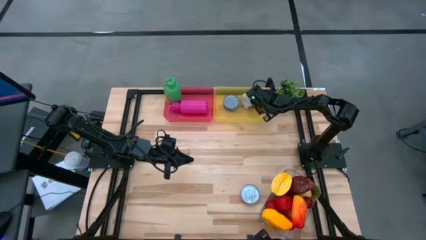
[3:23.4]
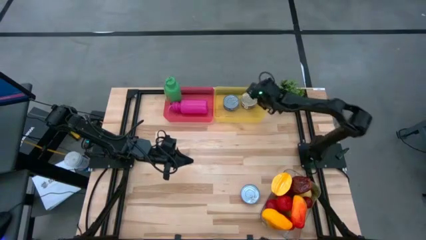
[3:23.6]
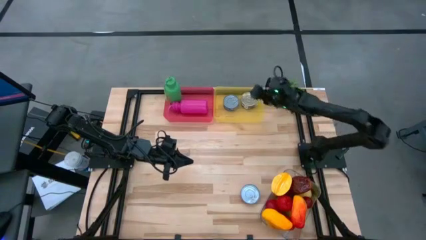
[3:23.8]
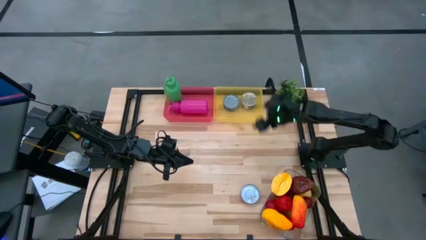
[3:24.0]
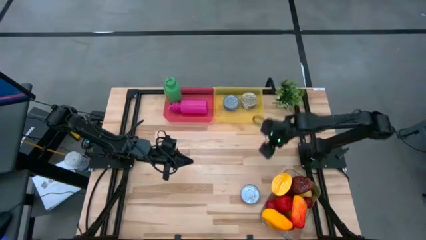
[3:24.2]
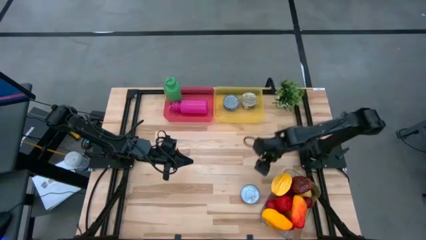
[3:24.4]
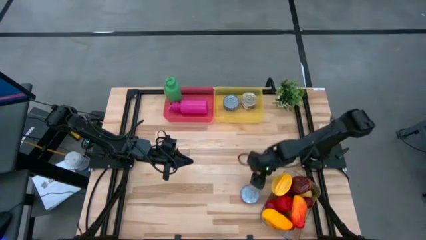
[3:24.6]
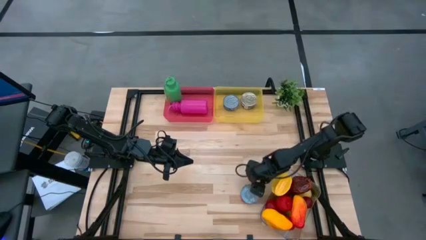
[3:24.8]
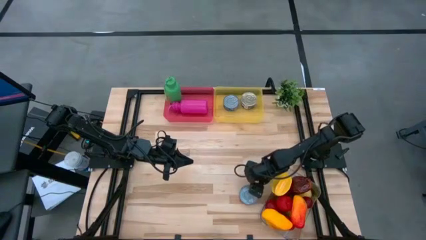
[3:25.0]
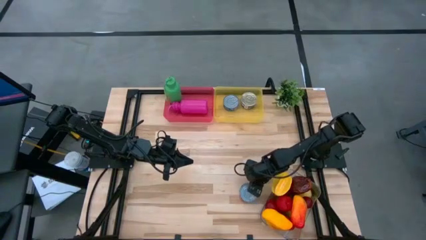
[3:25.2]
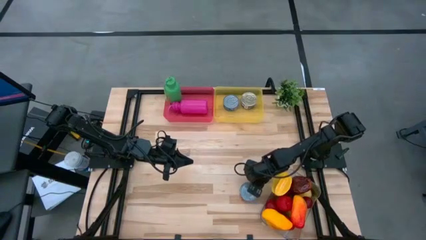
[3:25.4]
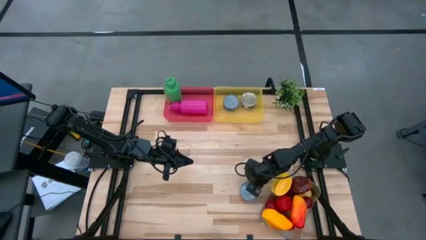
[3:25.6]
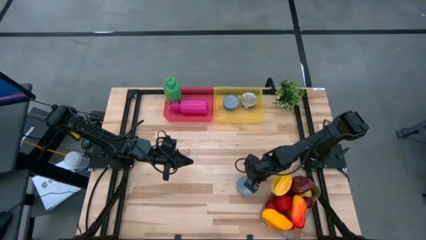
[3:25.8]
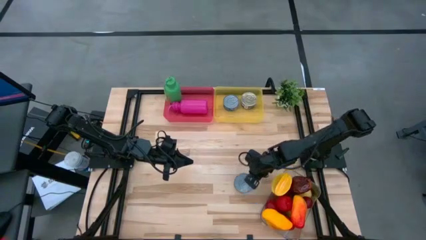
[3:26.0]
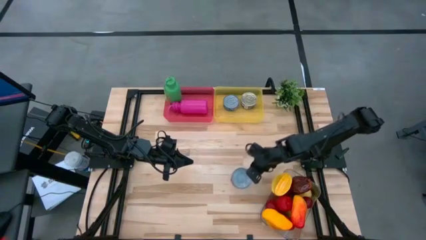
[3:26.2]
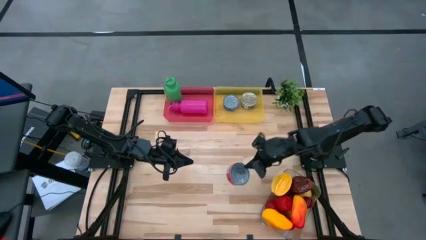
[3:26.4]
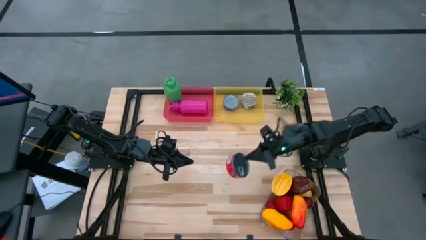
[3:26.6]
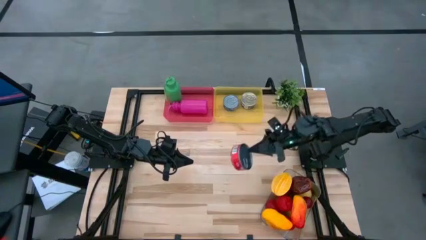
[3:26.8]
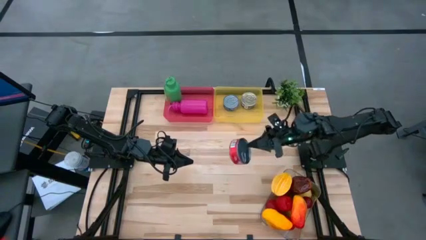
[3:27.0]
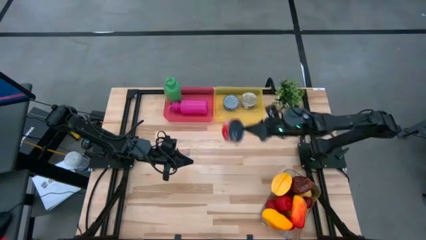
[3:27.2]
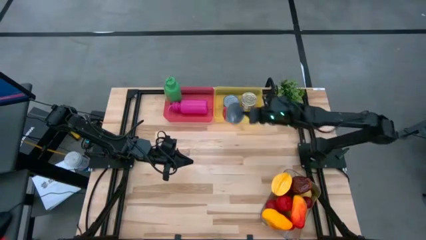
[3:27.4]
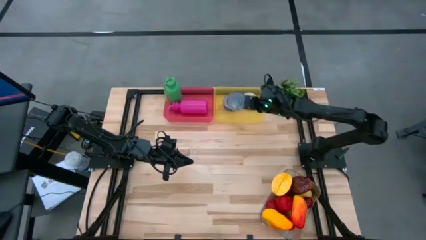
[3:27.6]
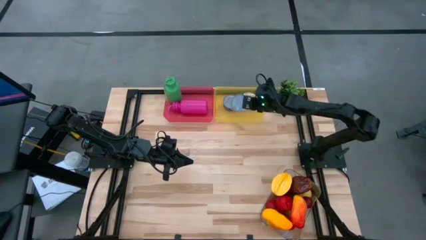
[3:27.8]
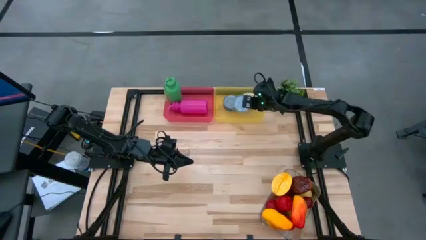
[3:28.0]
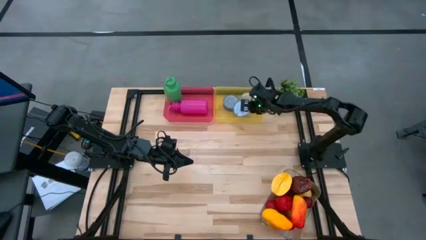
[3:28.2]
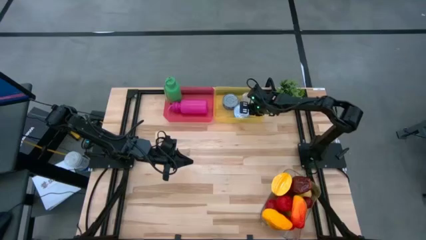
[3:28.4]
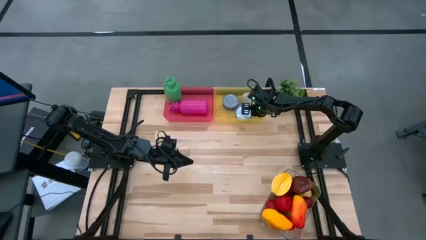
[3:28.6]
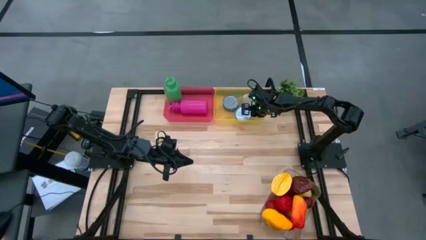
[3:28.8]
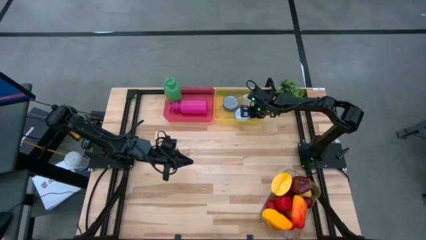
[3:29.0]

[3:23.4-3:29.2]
Task: Pick & Place Food Item
Put the red tuna can into the yellow bin

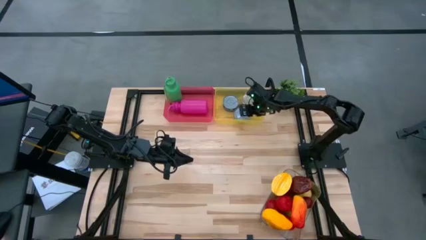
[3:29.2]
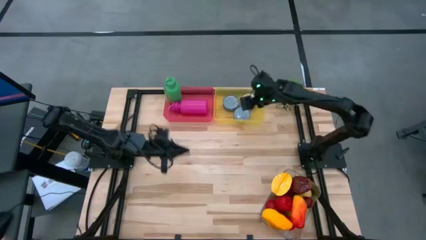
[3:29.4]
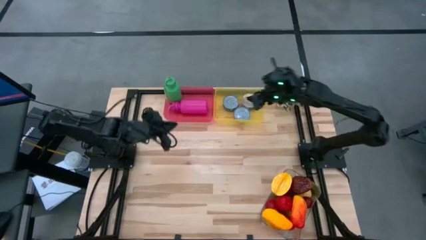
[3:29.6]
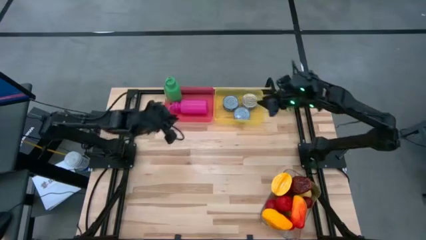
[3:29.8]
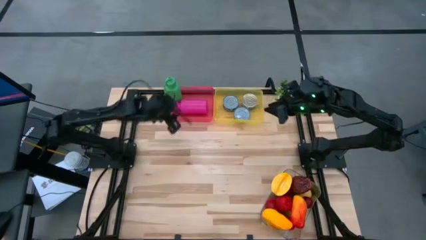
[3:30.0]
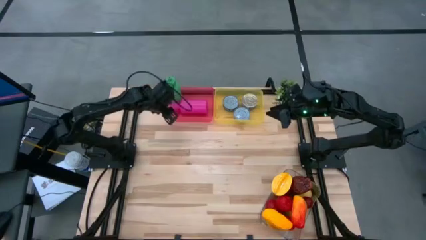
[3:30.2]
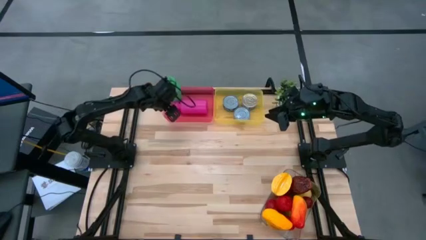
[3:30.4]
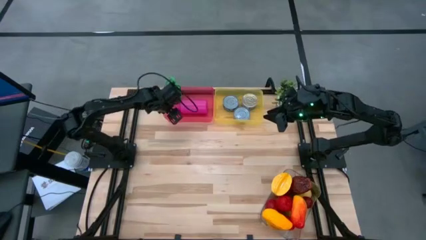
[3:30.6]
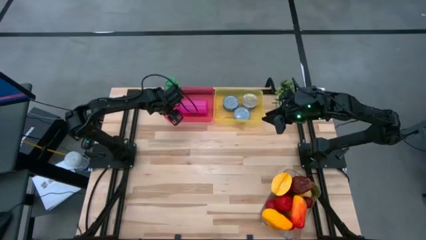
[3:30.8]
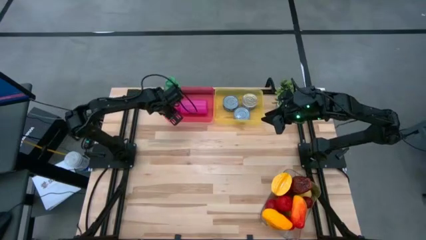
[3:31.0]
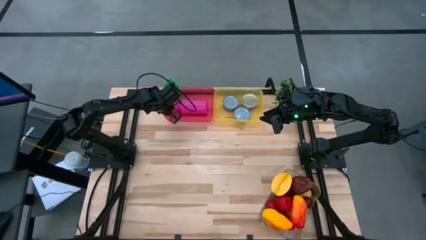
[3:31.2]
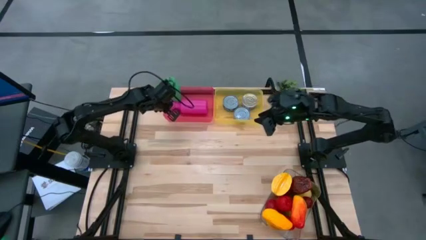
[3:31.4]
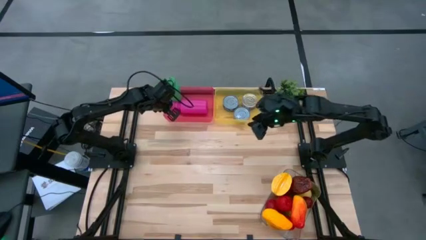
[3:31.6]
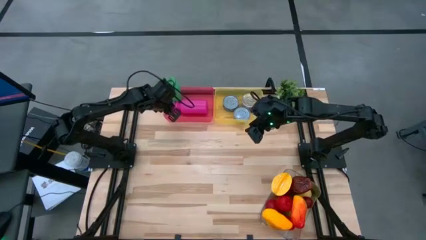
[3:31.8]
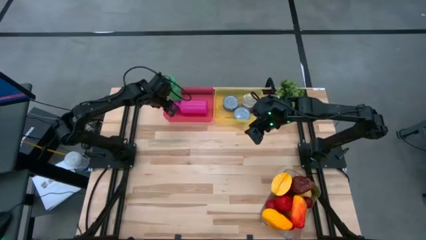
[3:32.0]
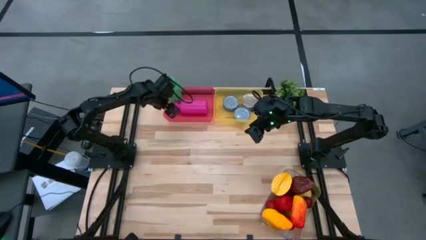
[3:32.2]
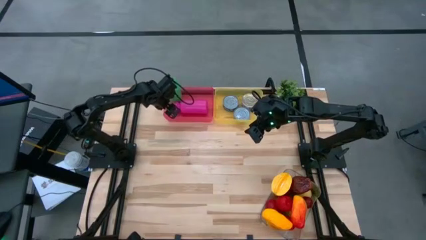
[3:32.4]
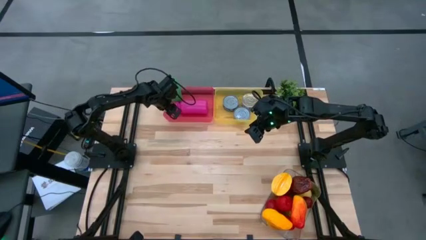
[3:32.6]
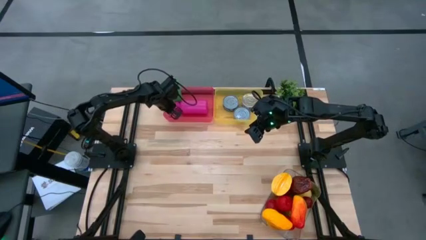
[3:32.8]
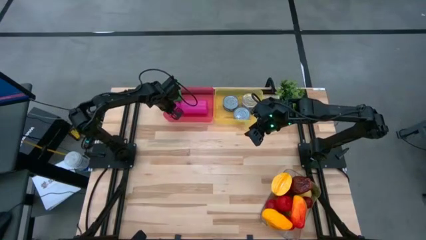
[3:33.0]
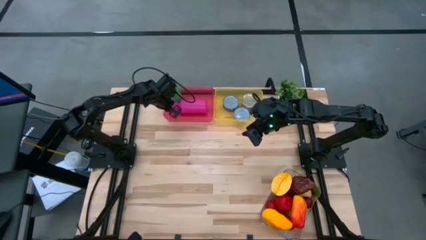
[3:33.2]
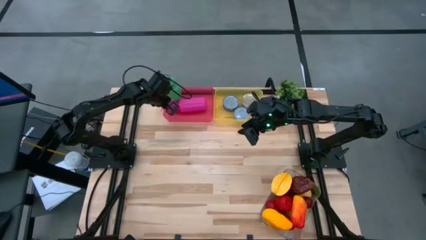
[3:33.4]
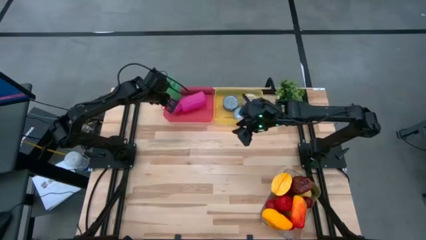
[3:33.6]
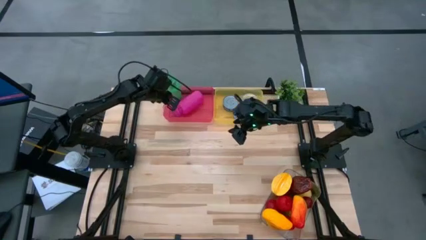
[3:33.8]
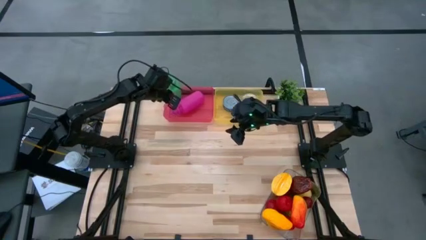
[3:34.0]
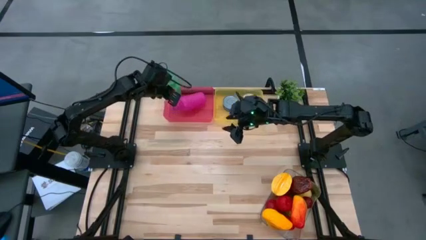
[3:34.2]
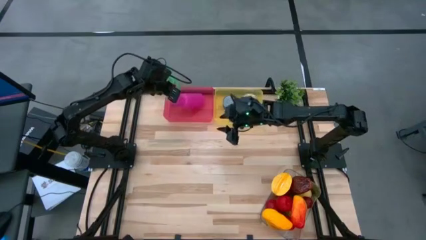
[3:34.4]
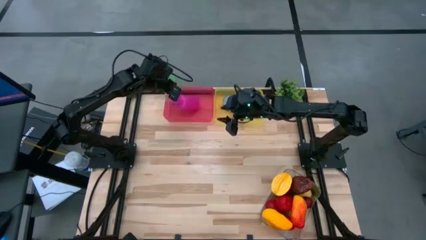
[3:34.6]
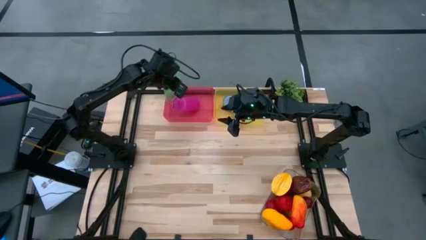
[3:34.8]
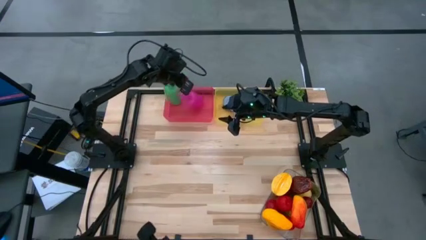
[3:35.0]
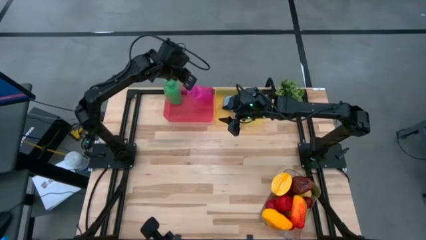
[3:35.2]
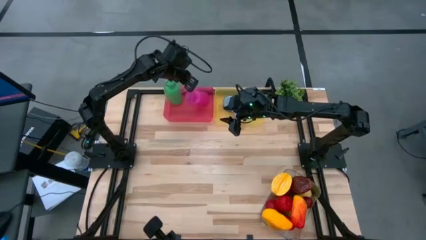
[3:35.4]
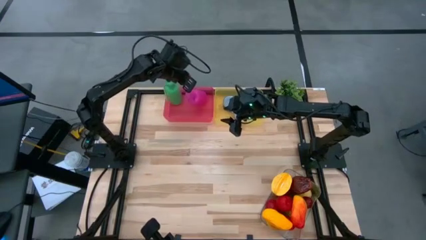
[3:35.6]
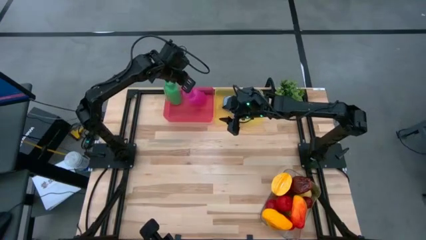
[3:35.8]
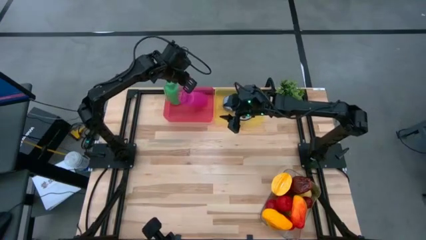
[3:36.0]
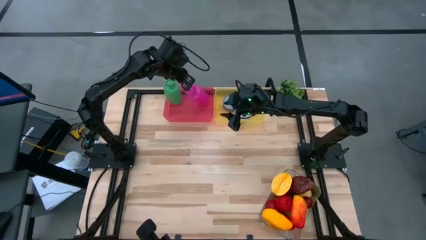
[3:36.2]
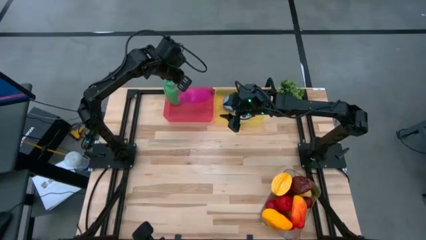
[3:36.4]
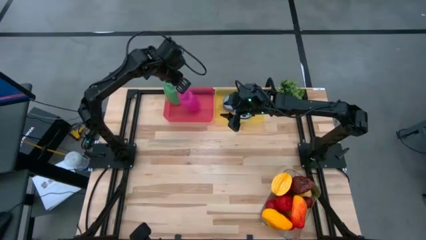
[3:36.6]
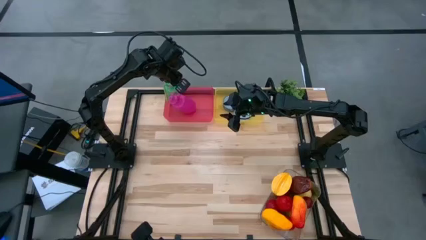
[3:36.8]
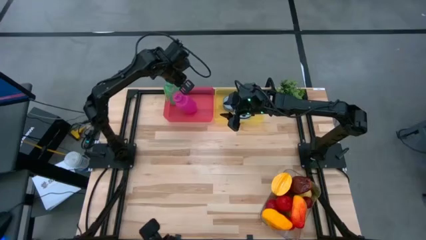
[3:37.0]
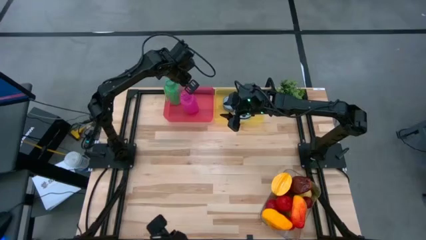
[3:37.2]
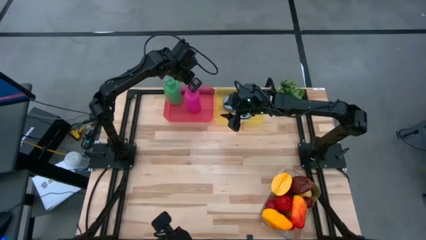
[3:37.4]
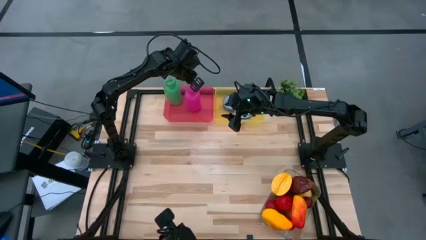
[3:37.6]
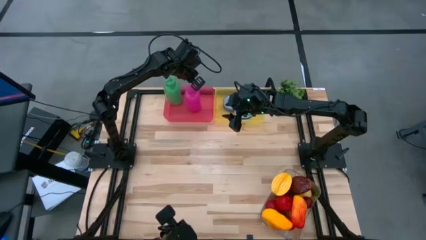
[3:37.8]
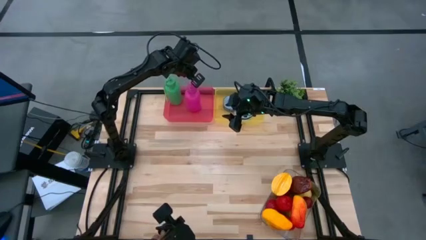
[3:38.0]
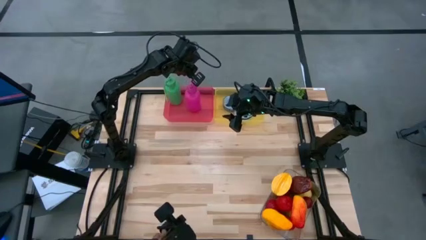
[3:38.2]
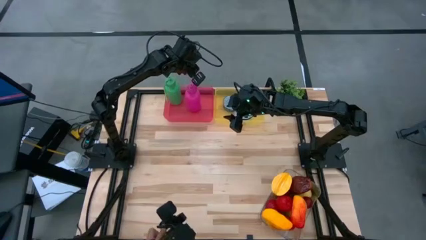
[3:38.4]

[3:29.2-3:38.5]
Adjust the pink tumbler

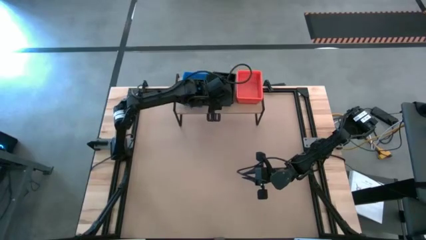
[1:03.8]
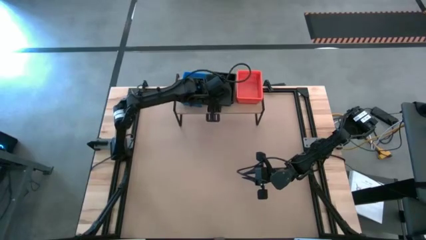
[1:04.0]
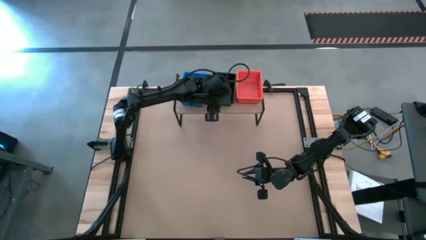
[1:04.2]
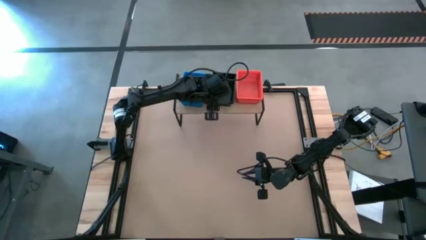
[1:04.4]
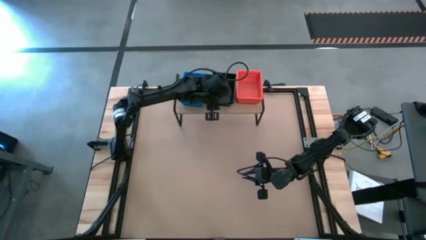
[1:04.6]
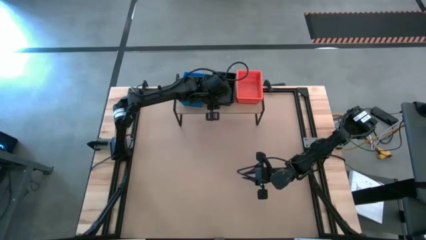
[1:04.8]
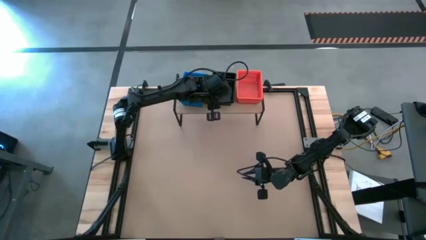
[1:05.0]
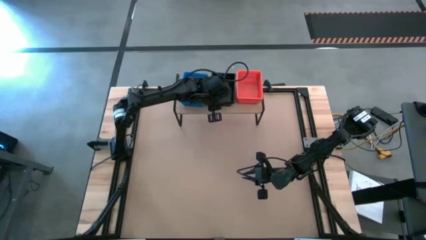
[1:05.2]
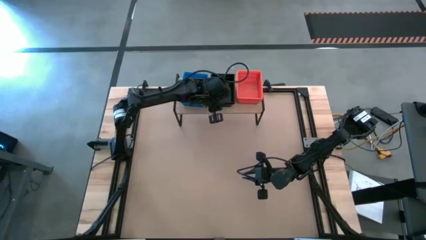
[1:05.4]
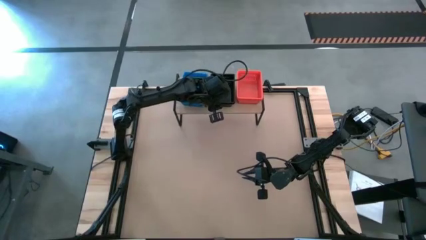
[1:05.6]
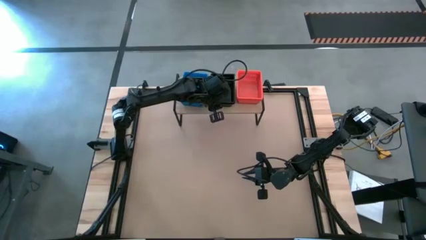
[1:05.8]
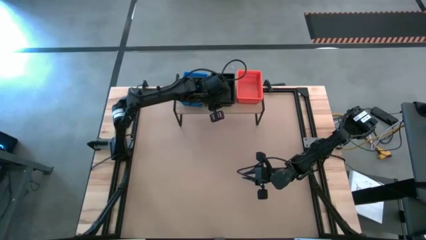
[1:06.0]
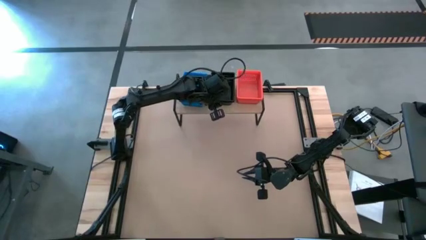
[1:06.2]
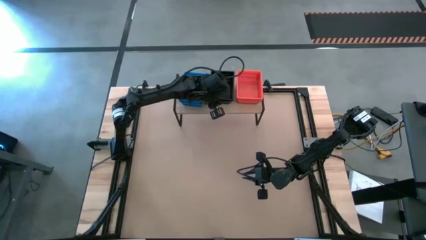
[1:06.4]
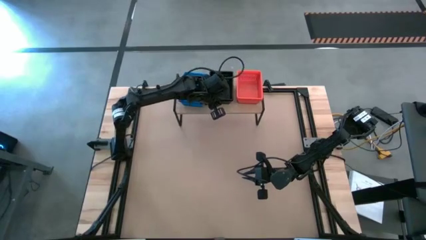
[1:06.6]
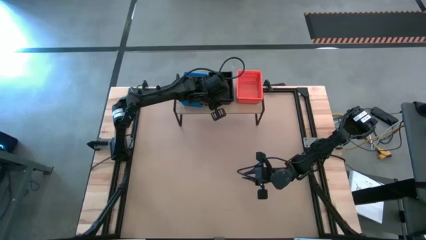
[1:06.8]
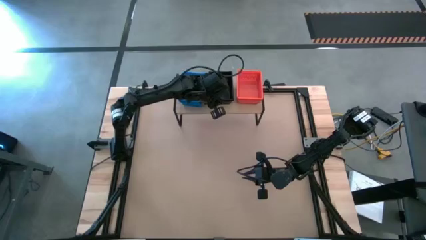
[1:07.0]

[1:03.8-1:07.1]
Task: Stack baskets on shelf by color
Adjust the stacked black bins
